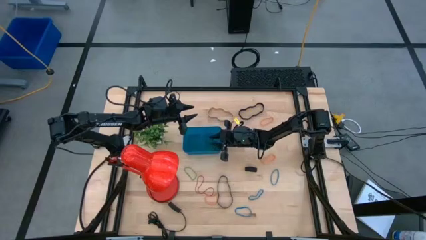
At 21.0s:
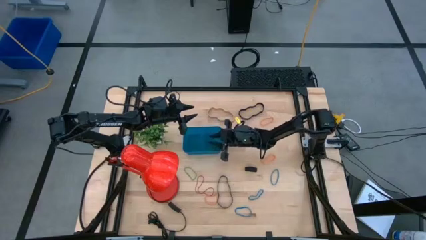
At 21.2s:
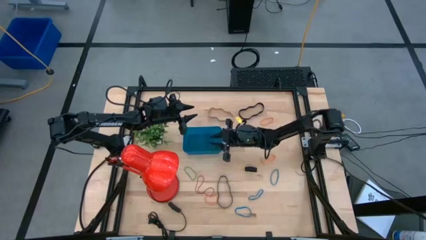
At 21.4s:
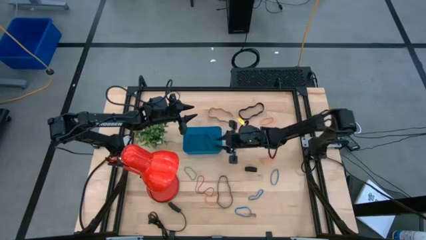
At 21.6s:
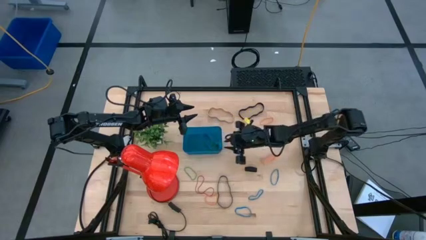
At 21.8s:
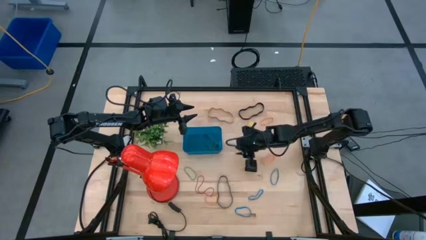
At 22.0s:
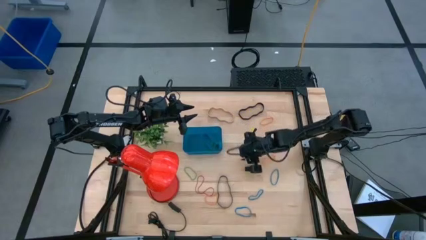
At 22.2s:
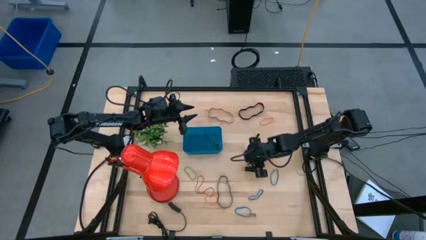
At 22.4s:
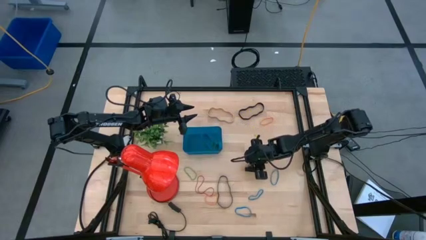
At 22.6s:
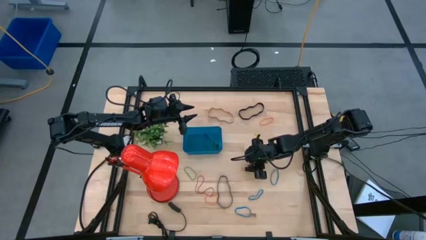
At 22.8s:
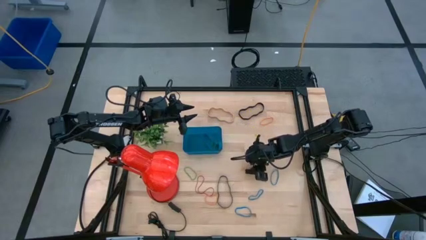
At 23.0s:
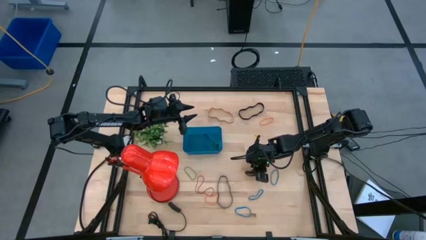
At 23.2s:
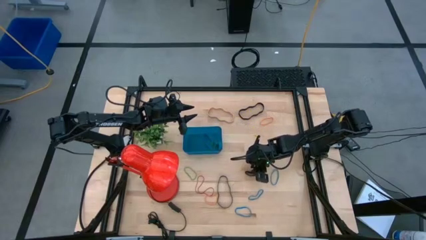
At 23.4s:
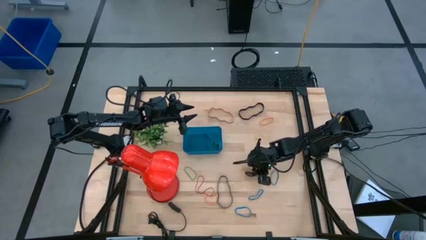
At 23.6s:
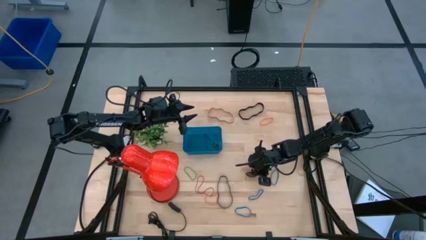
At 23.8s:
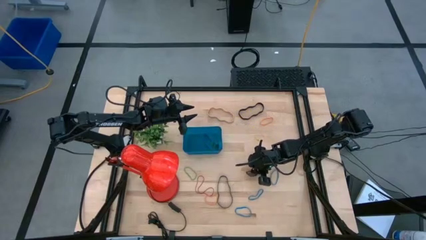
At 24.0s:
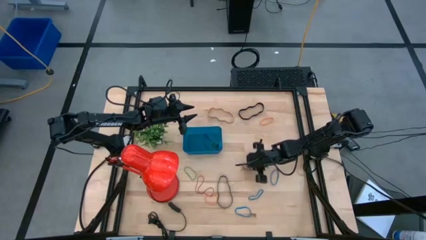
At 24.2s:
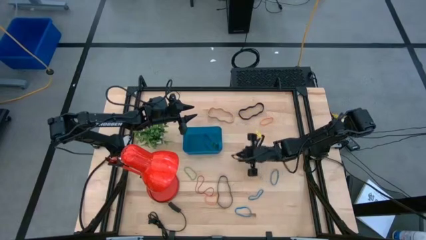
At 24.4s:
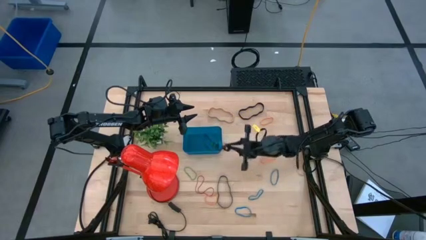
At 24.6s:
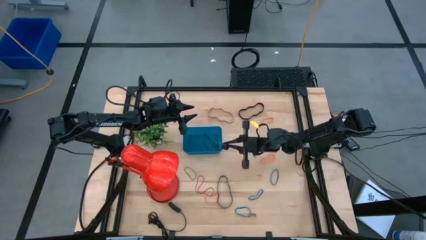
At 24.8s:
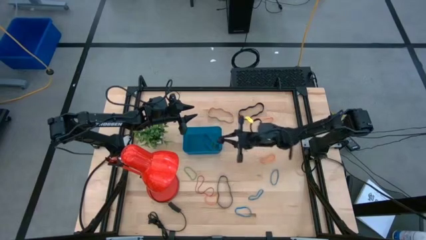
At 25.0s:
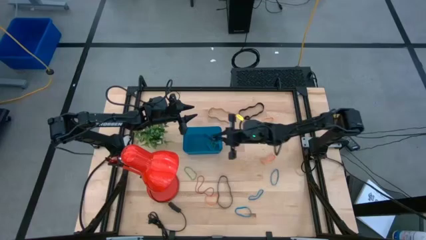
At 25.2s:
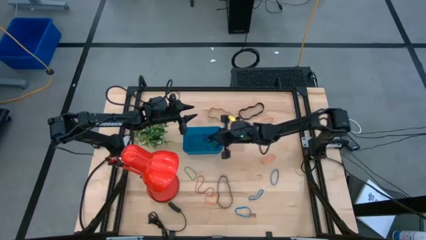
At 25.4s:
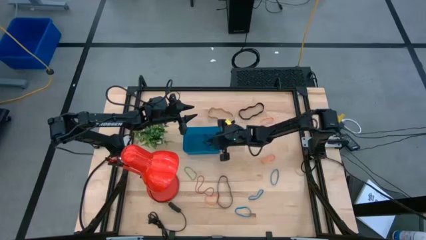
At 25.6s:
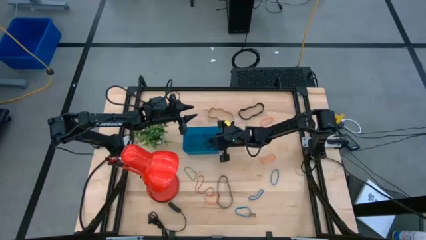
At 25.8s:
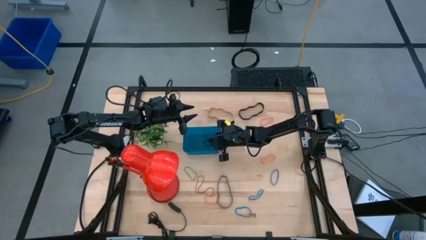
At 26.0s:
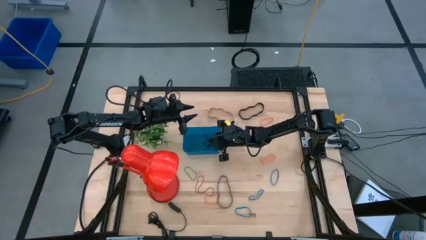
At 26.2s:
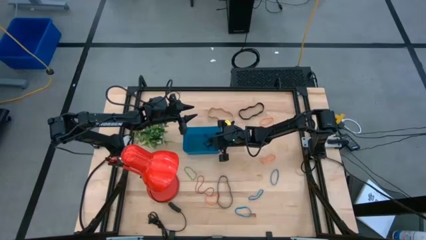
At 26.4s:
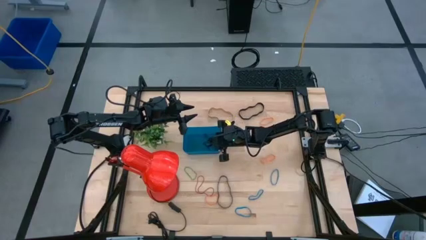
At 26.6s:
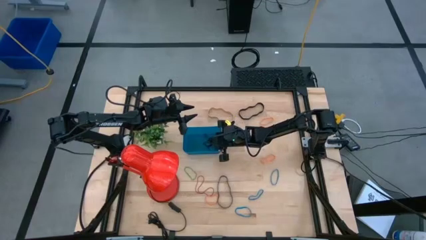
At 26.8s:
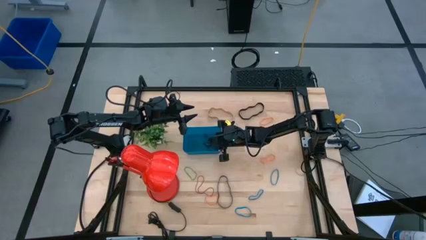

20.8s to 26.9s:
Task: Pick and place rubber bands into bin
Put the black rubber band into the blue bin

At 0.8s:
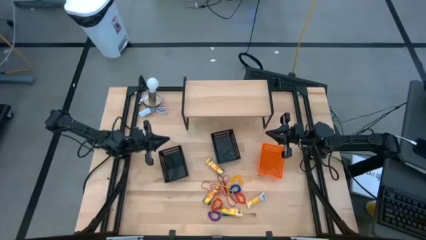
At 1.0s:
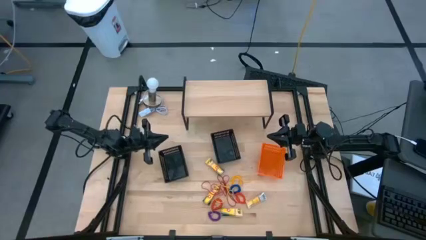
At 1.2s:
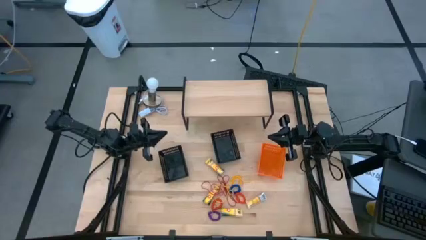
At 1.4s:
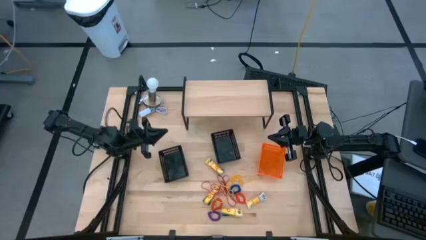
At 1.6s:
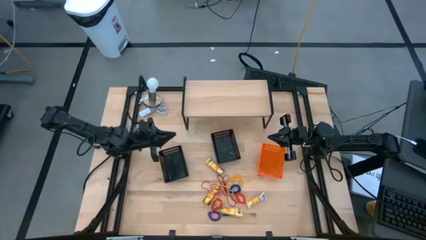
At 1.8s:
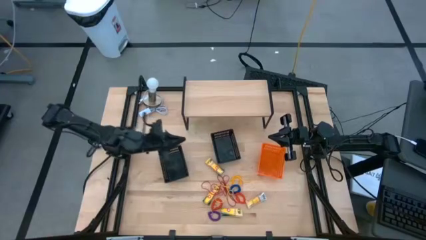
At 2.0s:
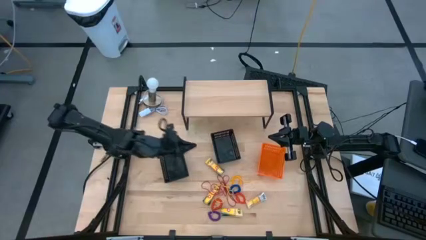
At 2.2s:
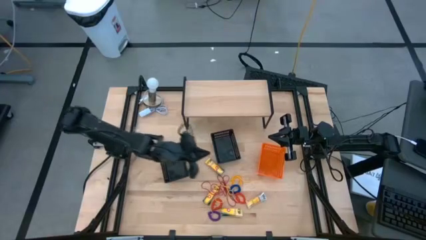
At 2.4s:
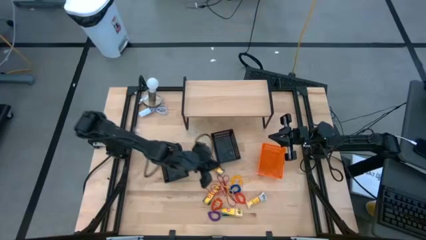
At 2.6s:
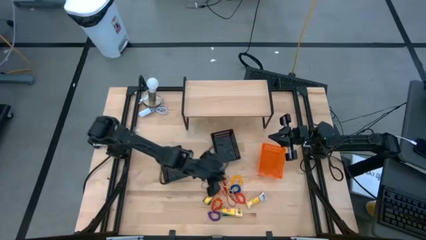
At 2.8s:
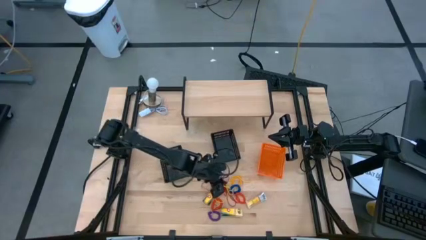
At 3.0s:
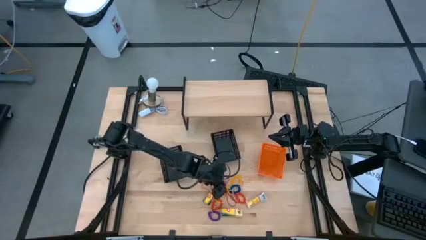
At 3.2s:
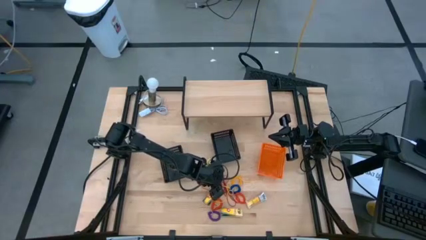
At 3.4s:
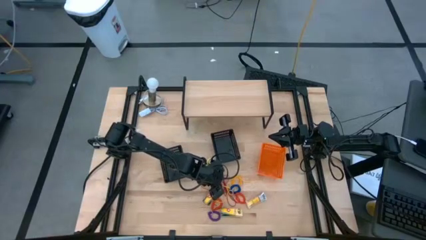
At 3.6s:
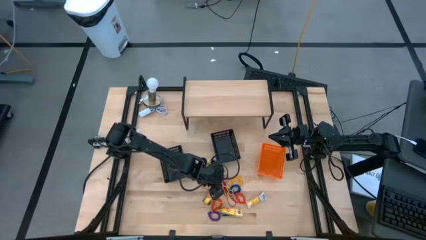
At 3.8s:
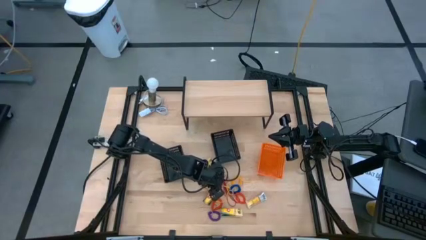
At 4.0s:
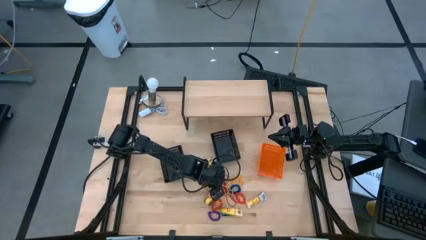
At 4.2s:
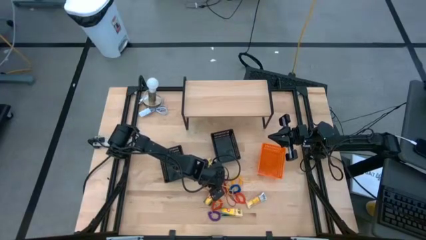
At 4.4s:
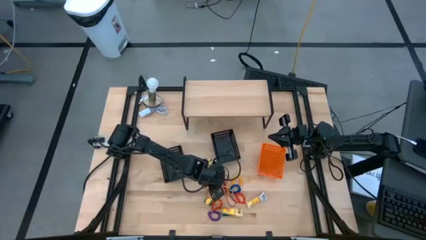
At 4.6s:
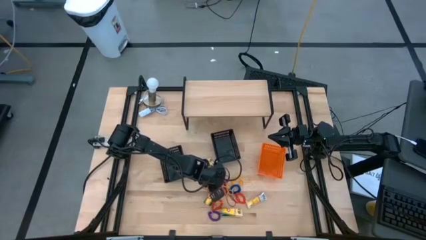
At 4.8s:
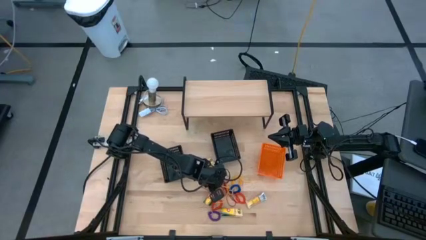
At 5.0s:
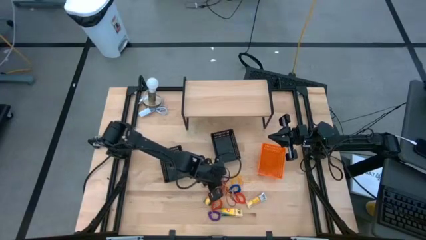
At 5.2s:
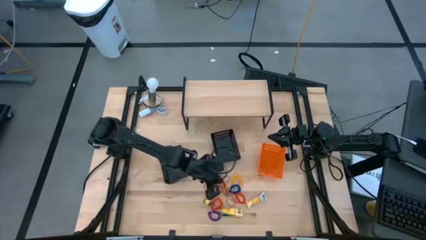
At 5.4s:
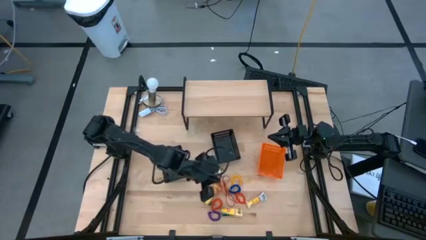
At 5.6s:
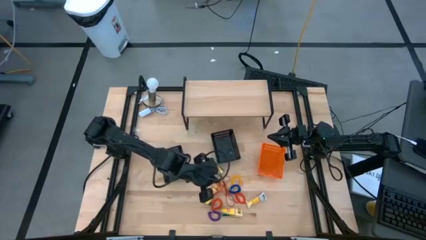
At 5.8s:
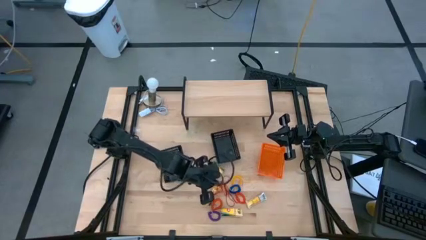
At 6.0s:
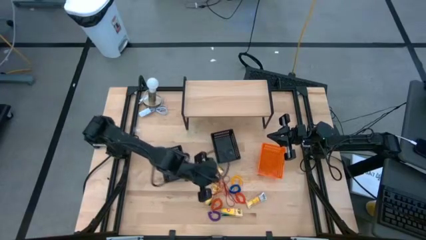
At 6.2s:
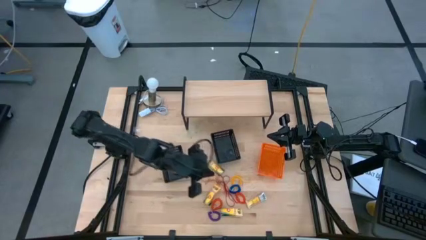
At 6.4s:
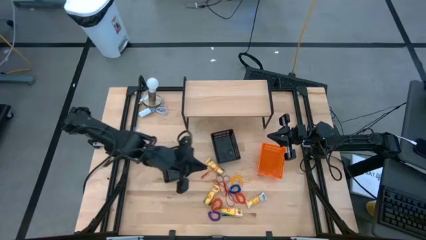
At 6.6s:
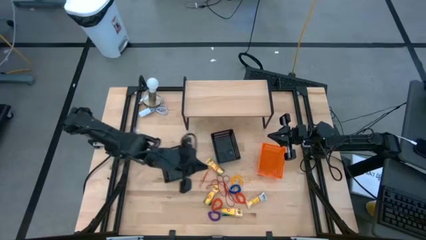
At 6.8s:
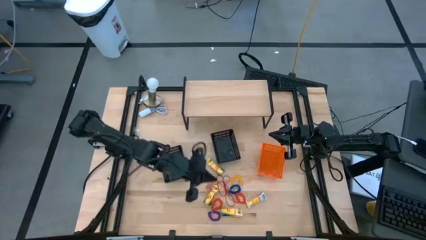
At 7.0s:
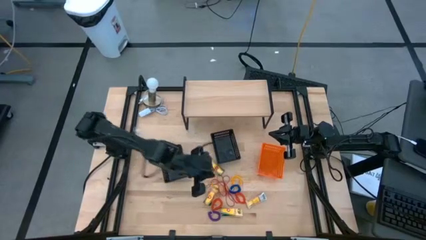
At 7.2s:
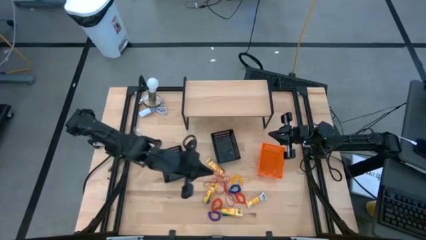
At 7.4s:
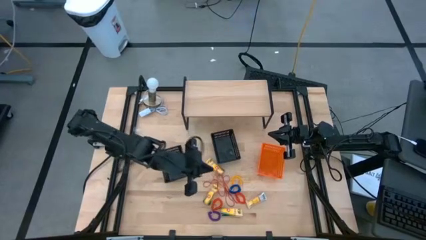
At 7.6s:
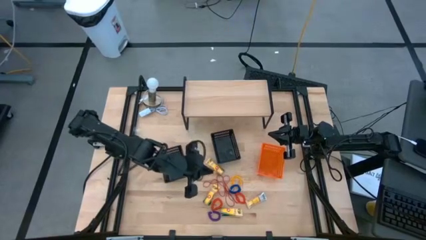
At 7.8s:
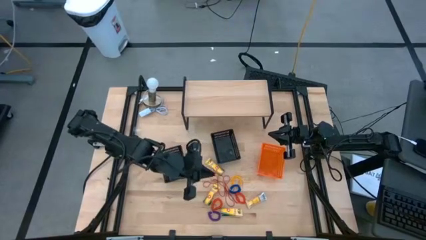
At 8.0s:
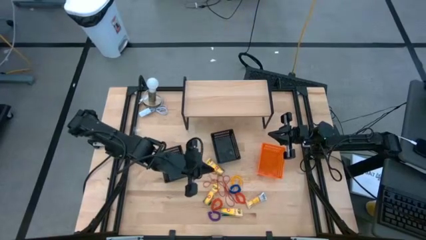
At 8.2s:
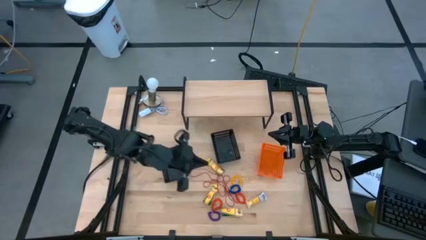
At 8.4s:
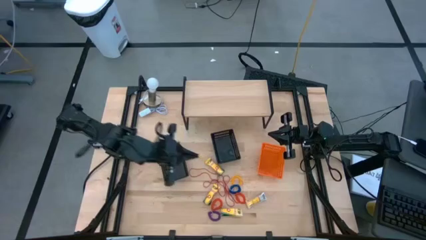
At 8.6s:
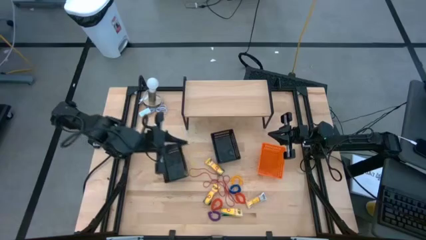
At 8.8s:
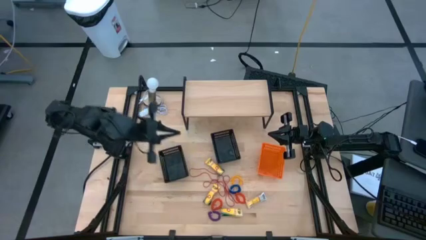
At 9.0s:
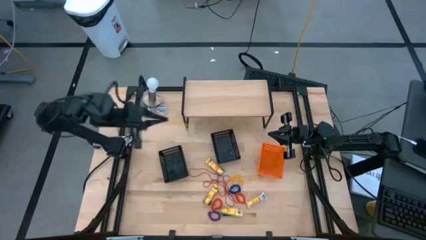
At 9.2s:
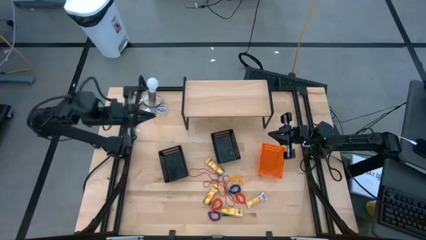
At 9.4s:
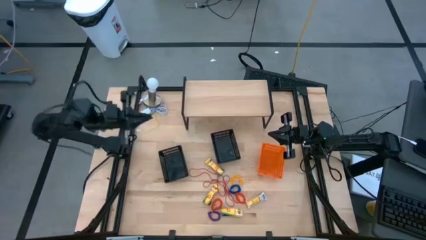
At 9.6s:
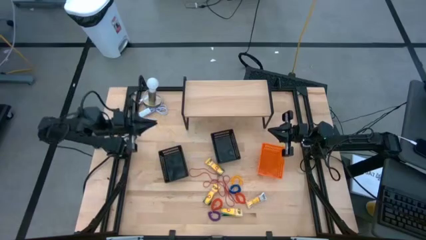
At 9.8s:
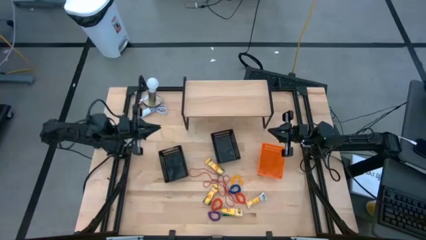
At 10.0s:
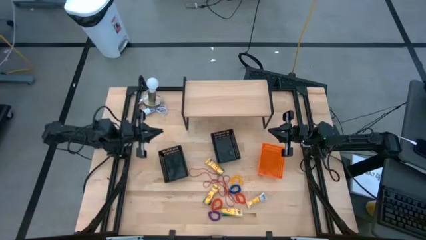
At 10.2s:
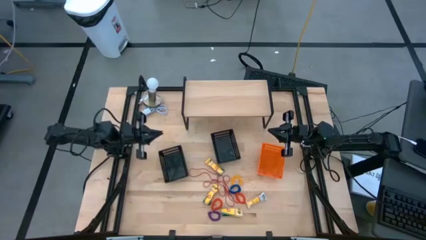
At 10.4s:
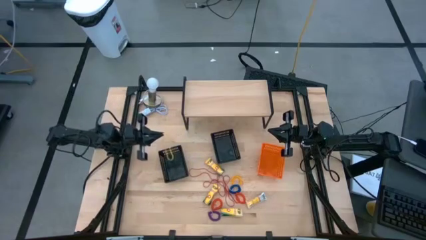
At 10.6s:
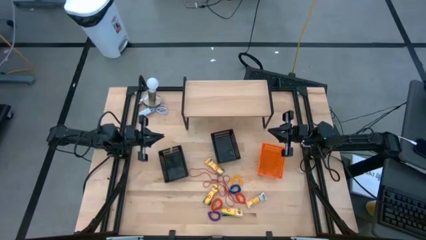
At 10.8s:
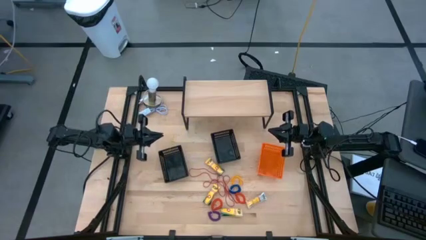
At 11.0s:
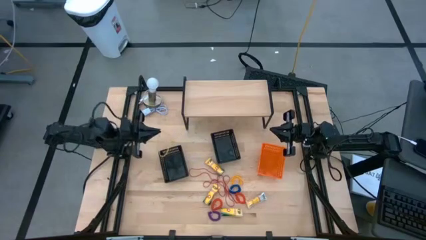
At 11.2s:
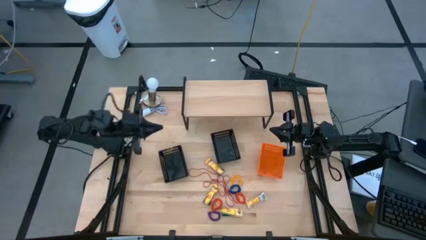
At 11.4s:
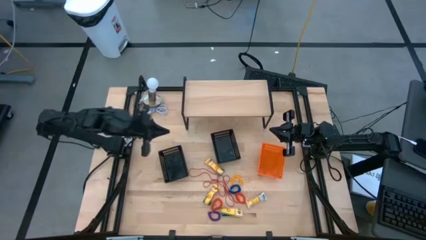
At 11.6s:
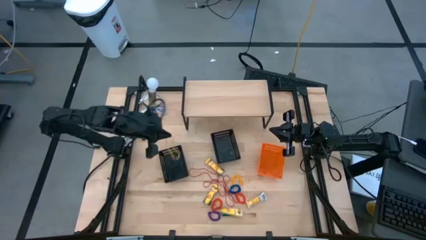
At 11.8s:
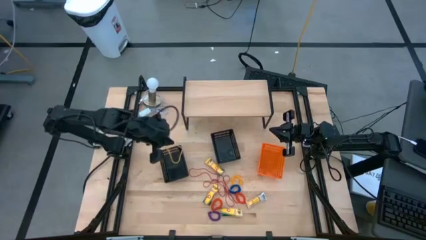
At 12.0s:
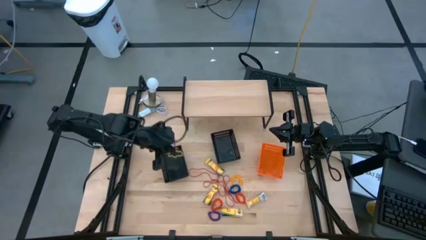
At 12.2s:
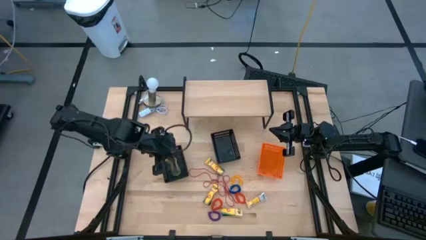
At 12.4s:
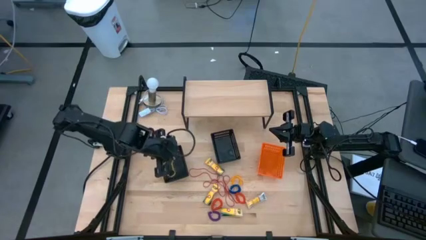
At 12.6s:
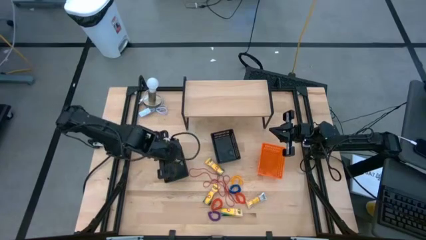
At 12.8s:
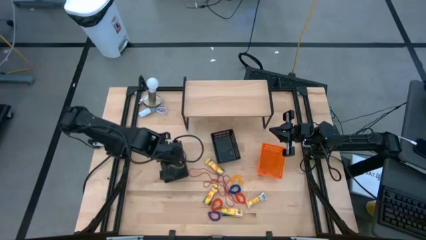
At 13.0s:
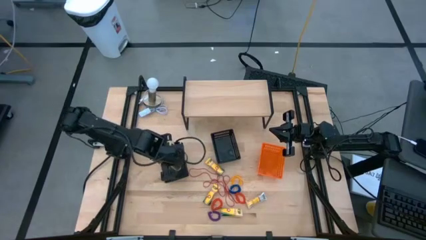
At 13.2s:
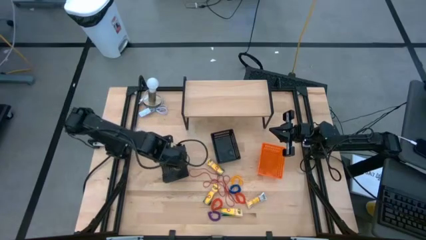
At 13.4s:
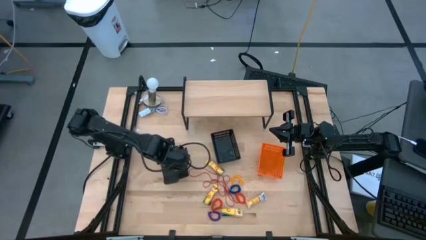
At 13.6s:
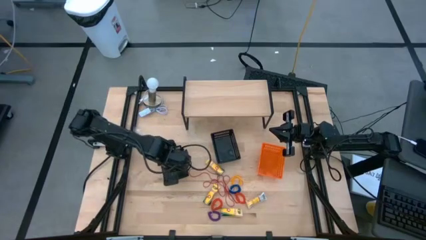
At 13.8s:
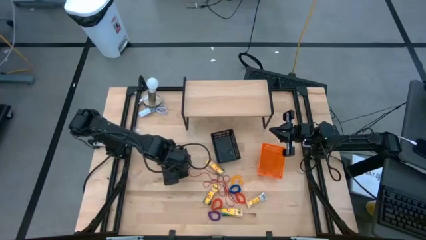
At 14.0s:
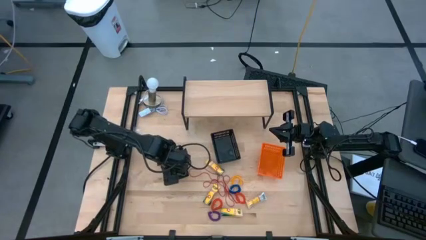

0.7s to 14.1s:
Task: Pick & Place Office Desk Supplies
Put the yellow rubber band into the left black bin
